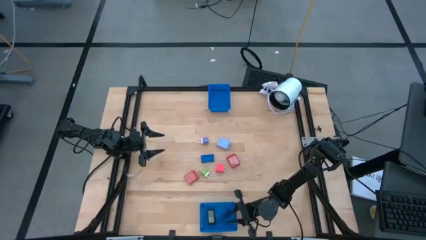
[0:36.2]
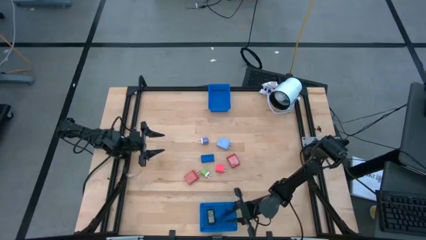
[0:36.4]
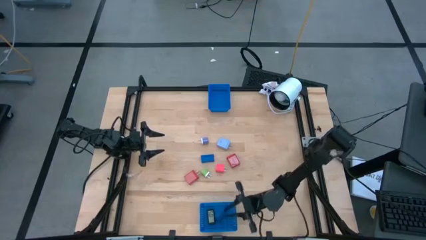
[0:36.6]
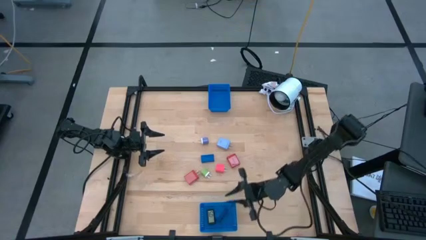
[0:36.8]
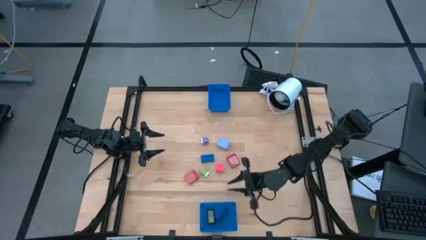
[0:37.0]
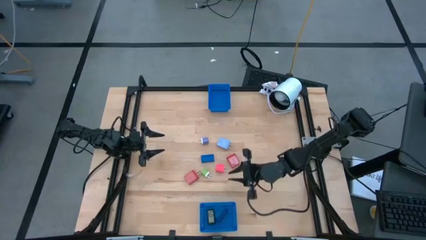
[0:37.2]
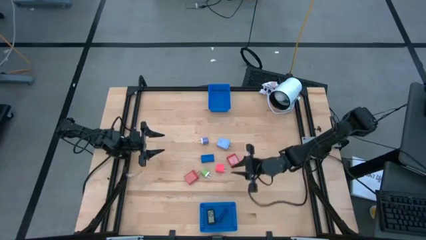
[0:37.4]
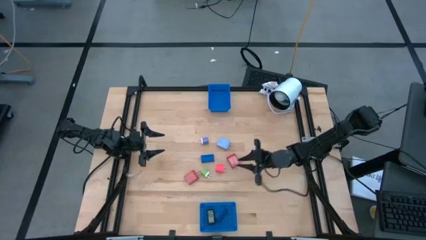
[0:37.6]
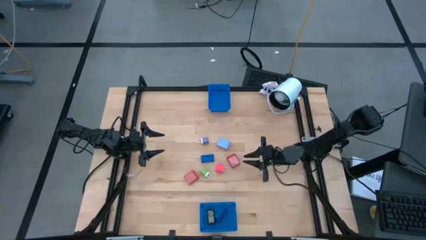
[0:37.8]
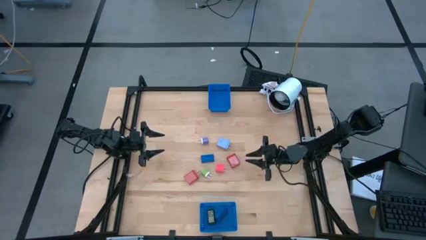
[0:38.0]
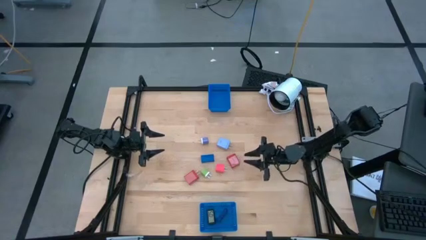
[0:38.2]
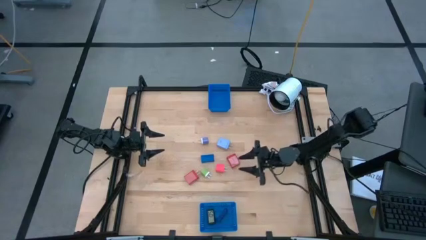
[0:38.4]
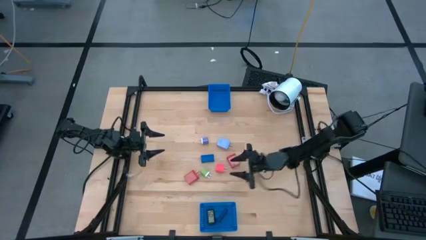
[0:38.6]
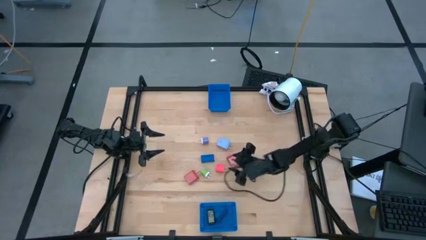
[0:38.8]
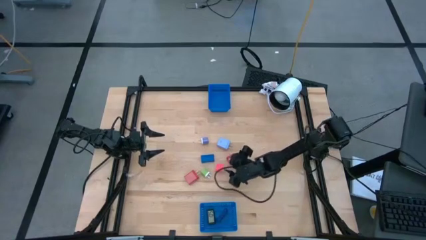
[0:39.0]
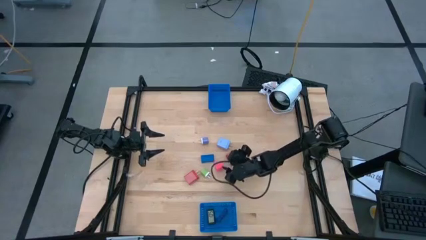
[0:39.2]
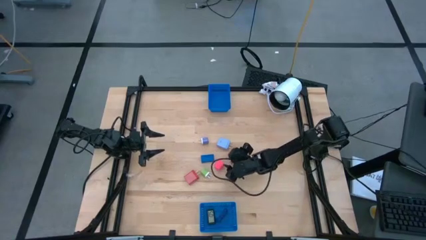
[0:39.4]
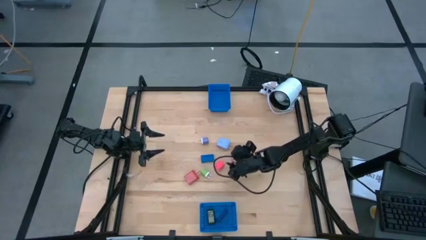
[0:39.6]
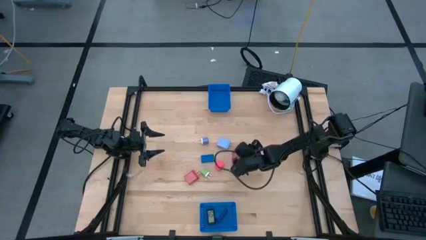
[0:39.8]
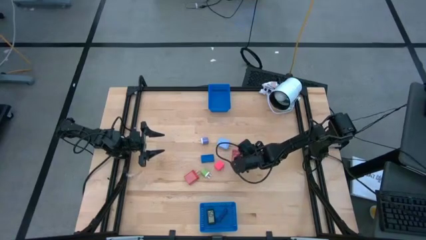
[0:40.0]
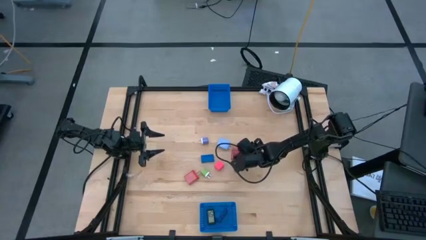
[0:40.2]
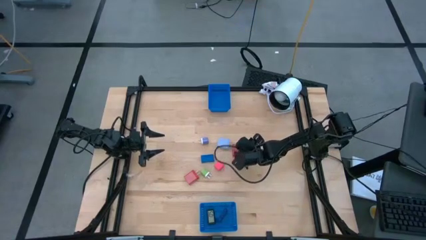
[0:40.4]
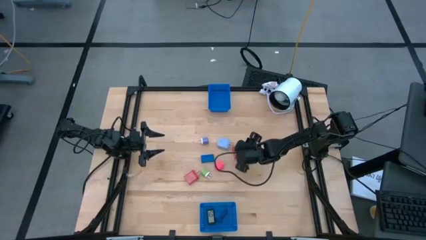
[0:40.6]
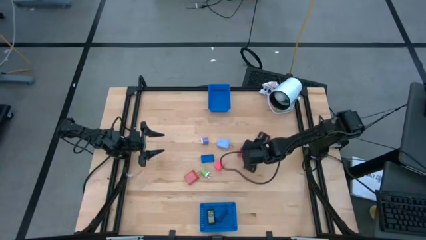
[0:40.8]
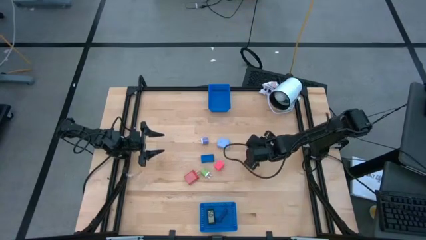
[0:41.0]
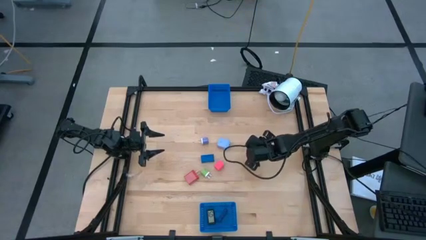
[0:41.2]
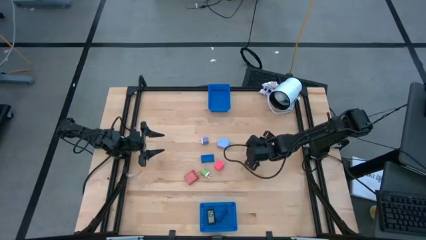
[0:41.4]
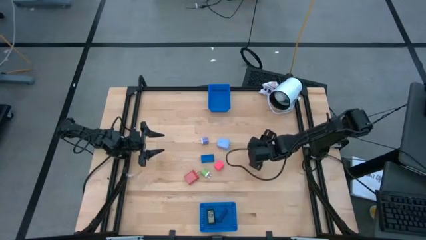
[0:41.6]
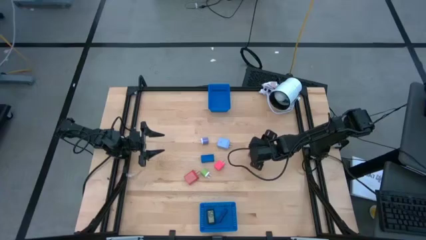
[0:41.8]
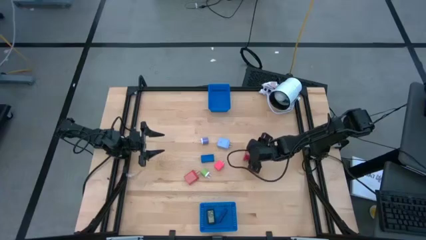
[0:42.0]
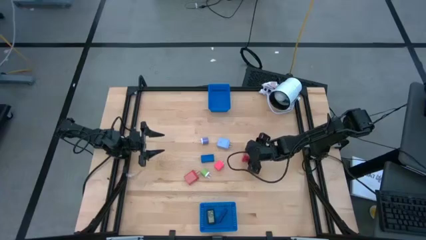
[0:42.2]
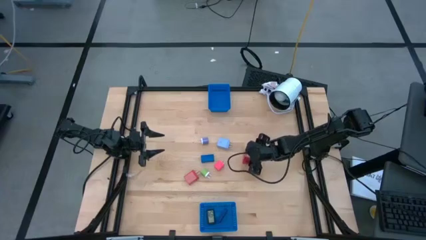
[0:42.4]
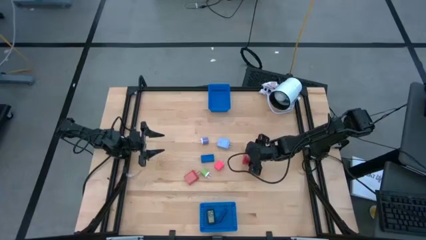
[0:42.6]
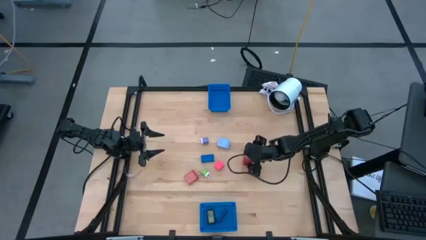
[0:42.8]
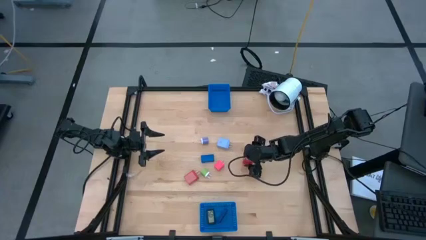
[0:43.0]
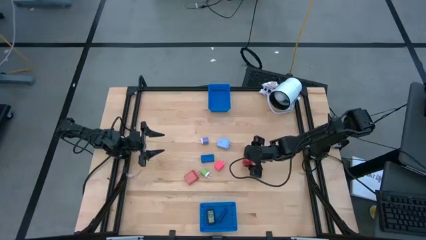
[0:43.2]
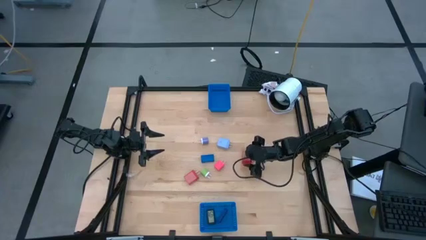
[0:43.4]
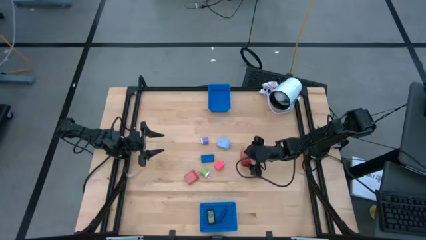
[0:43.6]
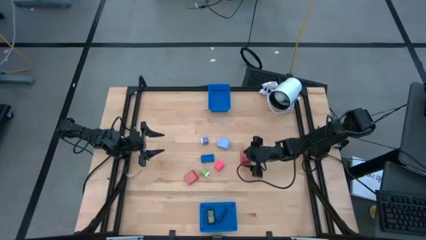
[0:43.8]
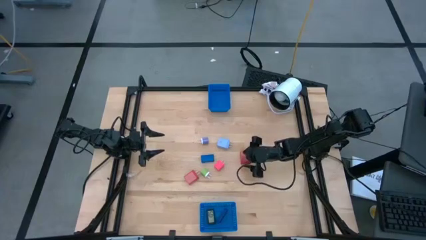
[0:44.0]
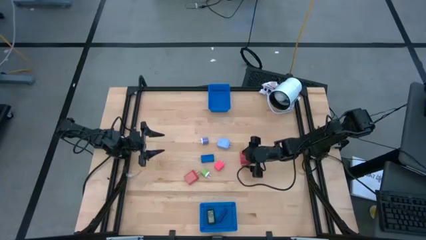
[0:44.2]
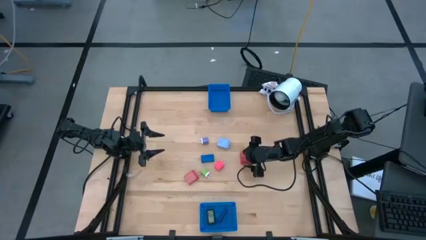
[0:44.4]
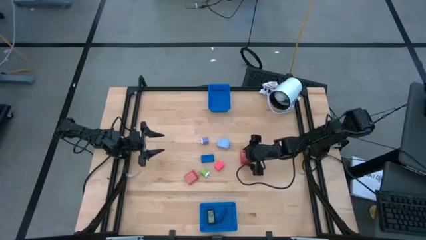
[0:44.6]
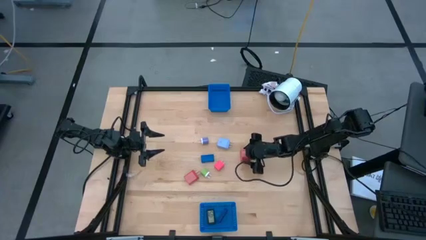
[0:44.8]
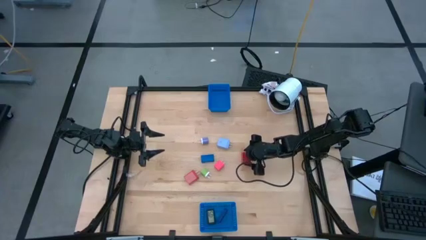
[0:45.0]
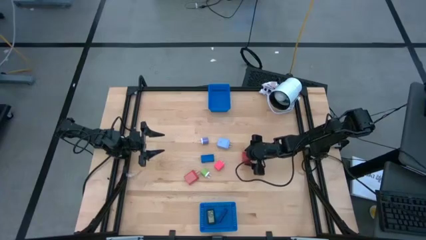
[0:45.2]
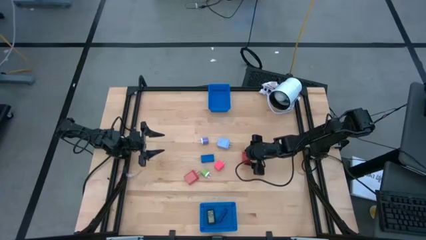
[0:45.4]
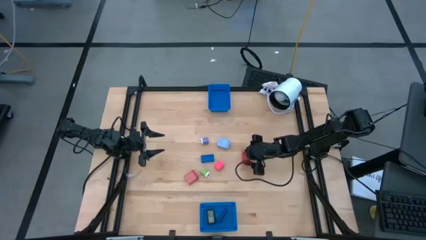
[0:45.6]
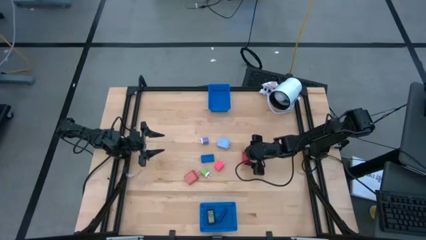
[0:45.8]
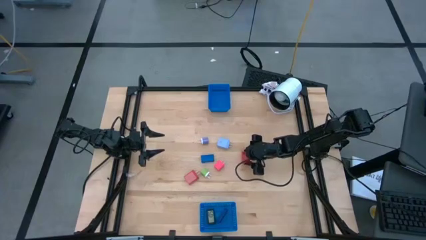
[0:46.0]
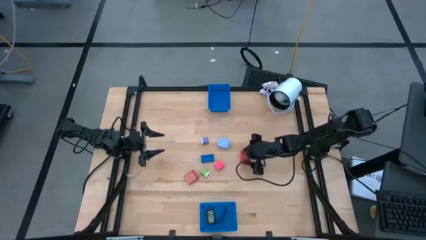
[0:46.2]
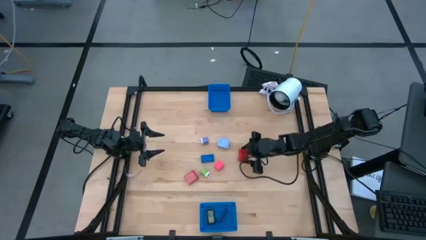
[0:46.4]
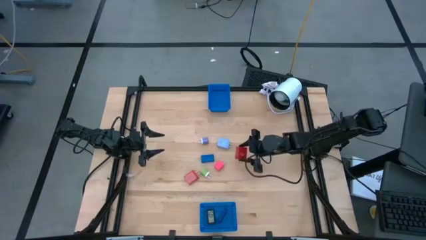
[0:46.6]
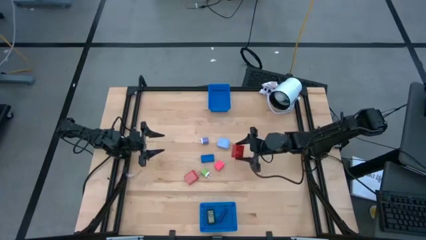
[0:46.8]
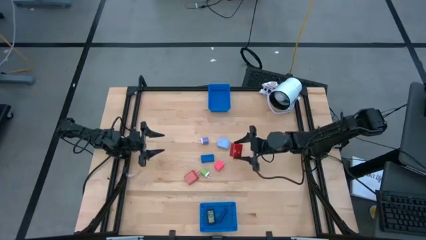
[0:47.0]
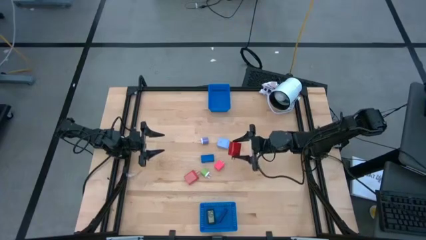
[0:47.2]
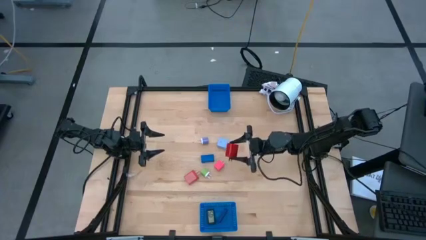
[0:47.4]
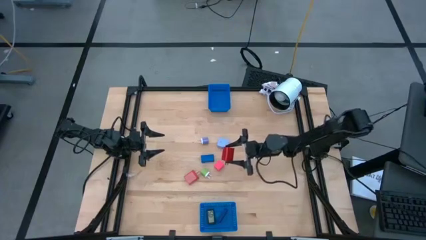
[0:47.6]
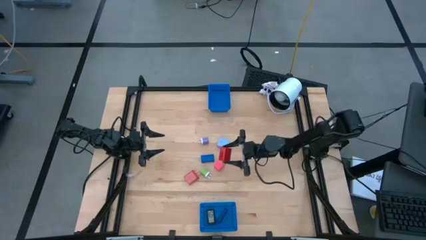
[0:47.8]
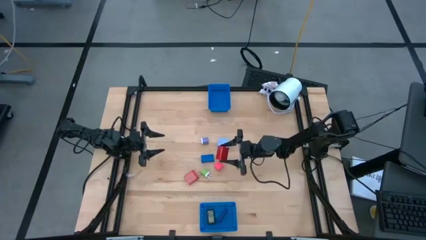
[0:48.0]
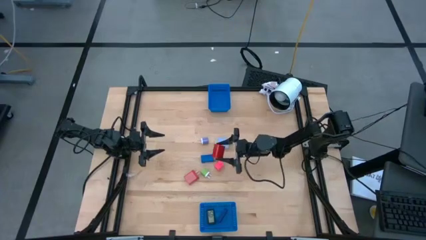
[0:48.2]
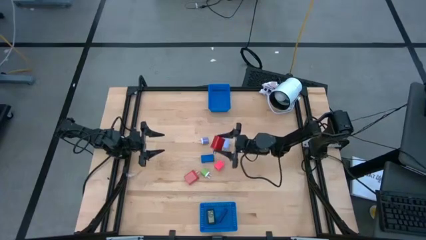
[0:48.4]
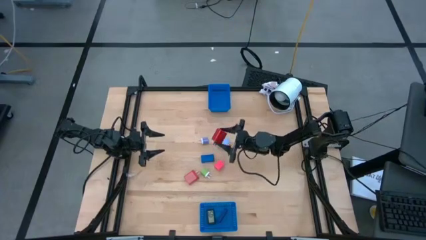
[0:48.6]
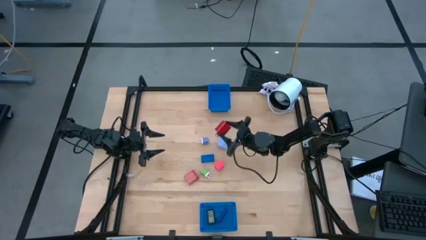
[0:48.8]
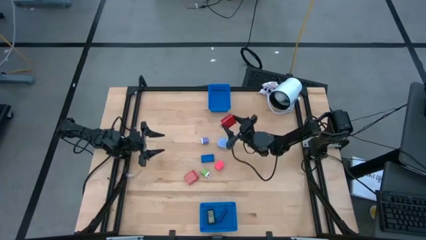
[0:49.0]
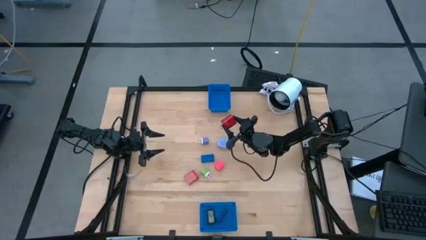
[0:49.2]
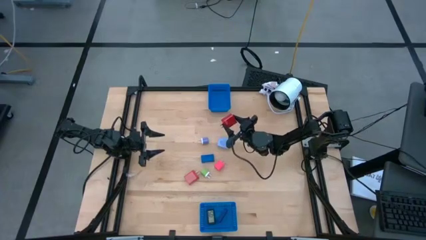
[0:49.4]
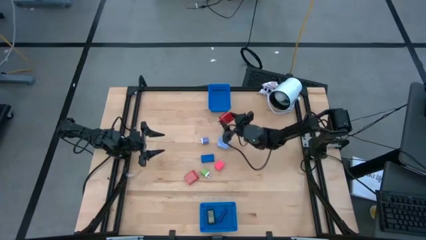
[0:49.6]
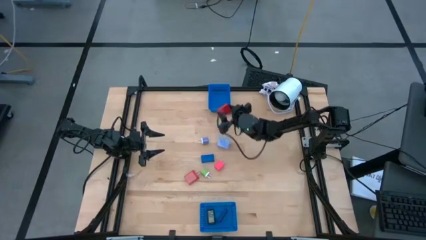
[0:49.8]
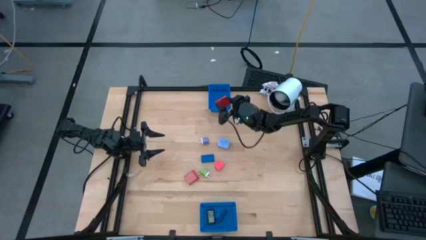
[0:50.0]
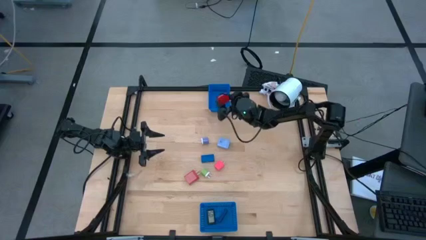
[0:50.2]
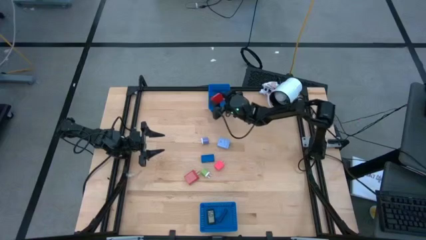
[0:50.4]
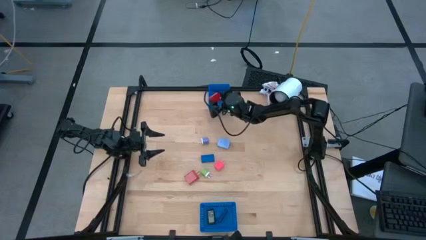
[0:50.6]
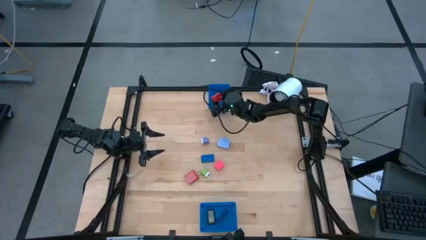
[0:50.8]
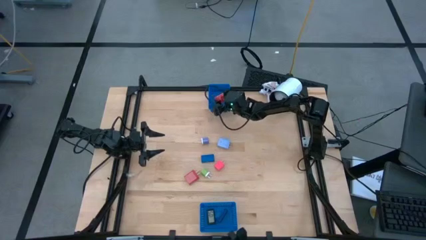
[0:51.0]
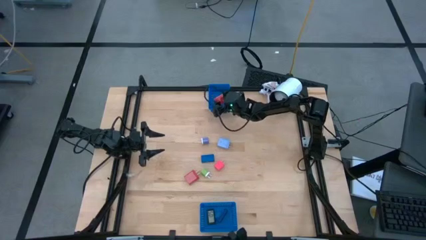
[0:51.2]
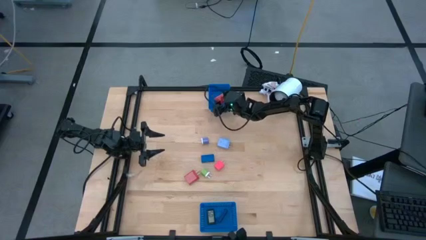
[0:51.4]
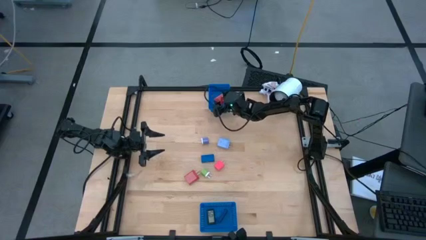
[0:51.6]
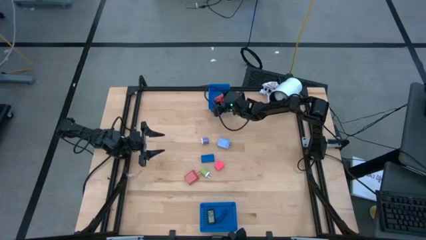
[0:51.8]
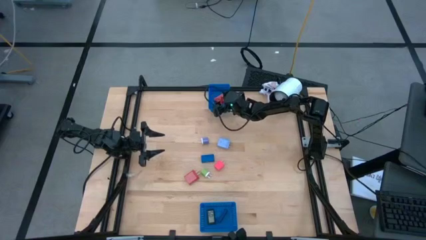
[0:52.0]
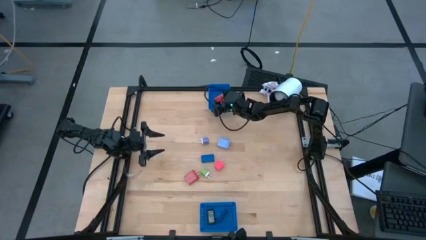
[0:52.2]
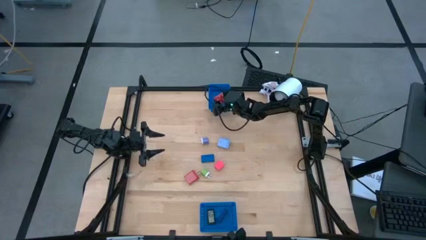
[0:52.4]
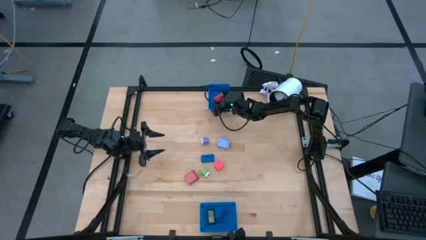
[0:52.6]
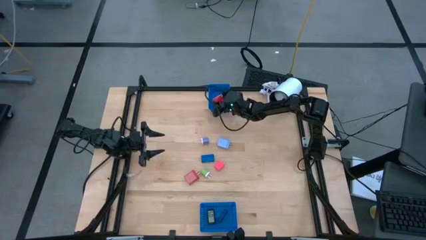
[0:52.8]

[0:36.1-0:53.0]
Task: Pick & Place Office items
Put the right red charger adapter into the top blue bin
